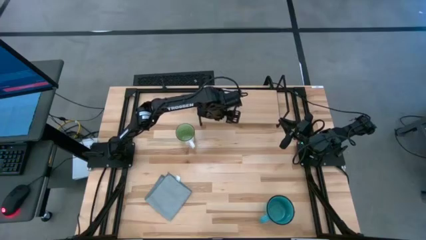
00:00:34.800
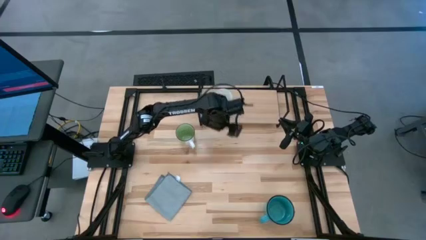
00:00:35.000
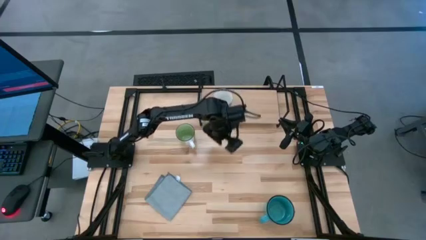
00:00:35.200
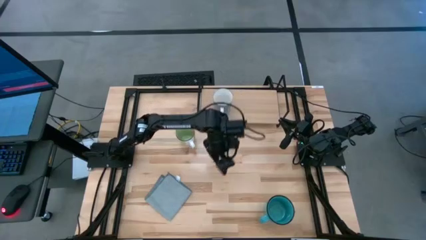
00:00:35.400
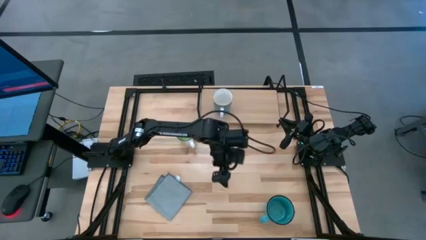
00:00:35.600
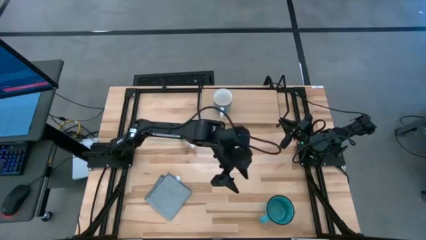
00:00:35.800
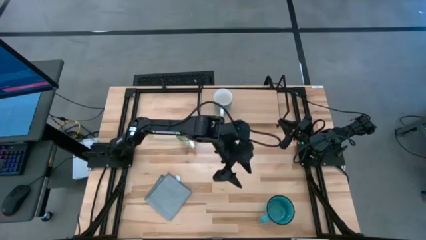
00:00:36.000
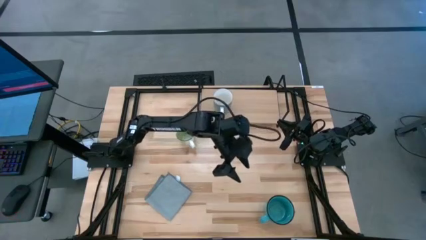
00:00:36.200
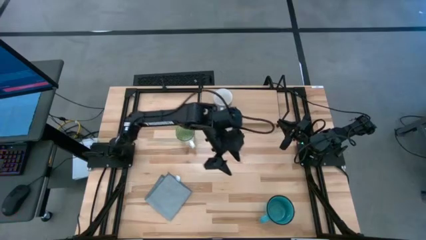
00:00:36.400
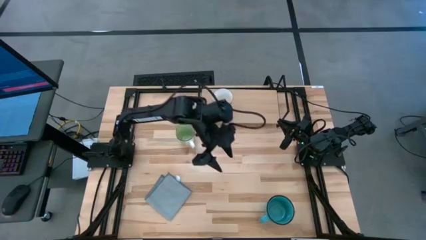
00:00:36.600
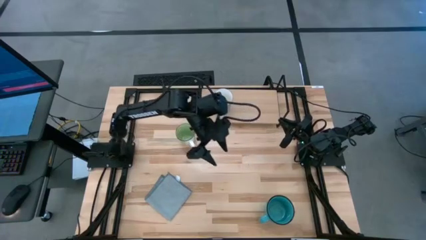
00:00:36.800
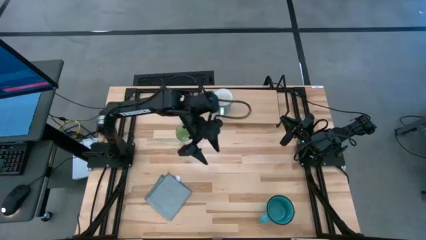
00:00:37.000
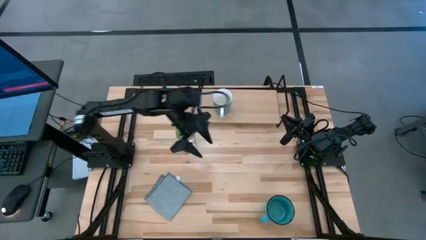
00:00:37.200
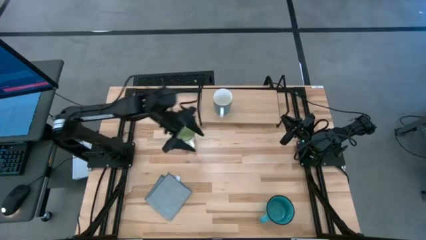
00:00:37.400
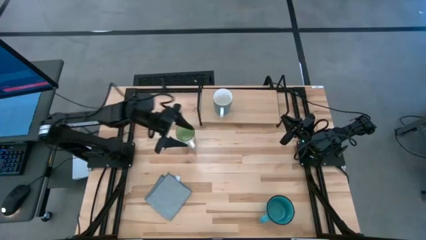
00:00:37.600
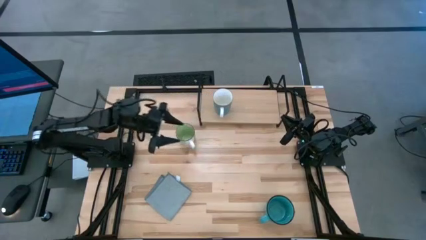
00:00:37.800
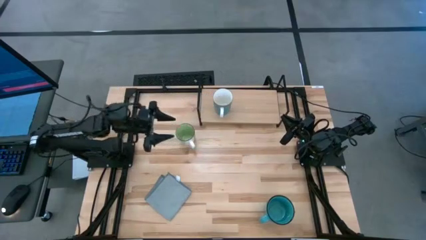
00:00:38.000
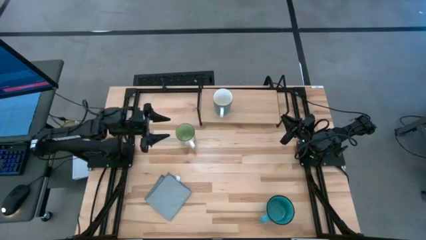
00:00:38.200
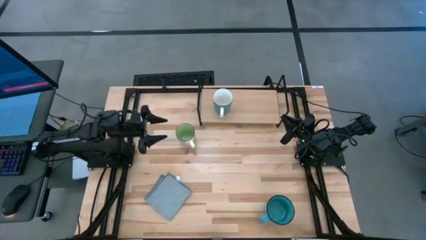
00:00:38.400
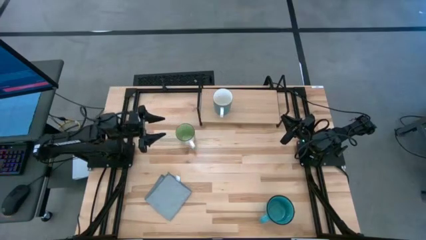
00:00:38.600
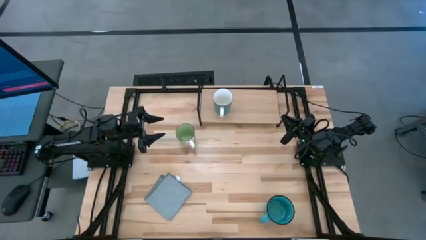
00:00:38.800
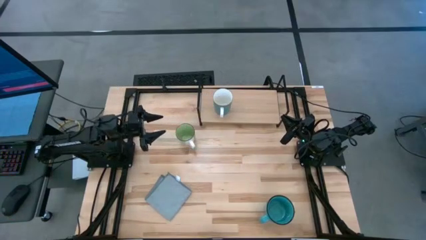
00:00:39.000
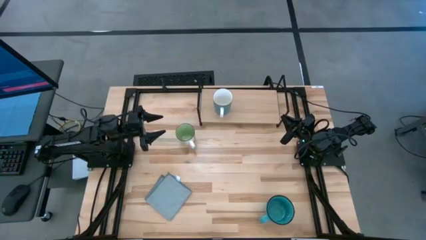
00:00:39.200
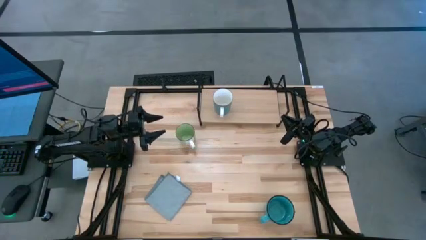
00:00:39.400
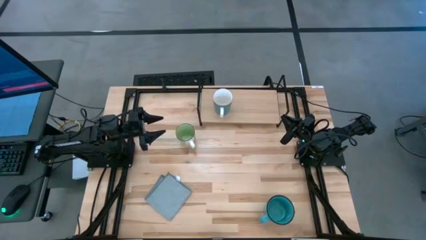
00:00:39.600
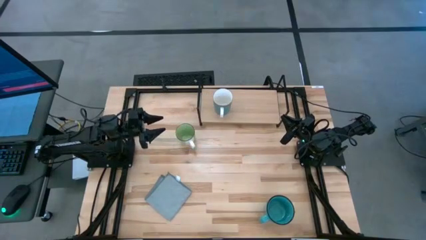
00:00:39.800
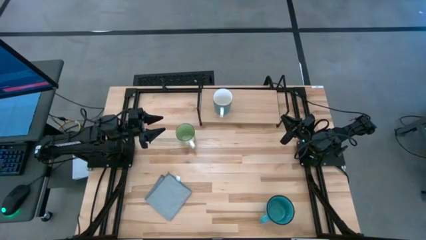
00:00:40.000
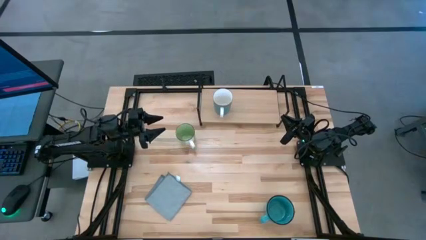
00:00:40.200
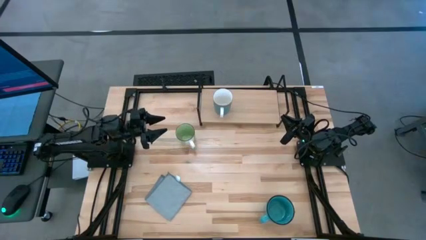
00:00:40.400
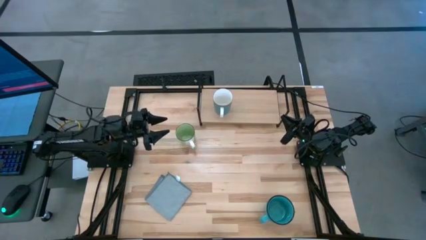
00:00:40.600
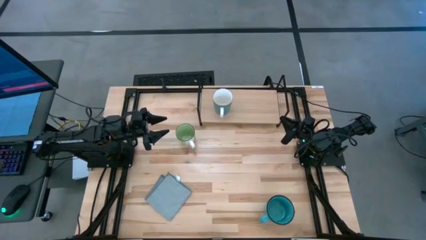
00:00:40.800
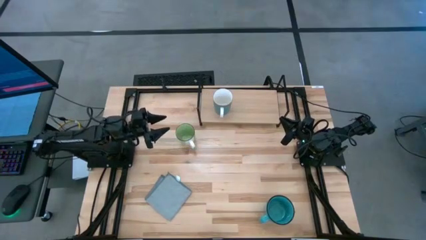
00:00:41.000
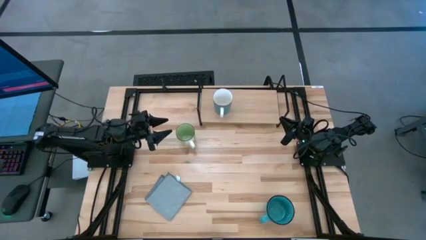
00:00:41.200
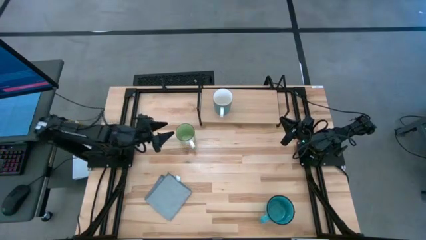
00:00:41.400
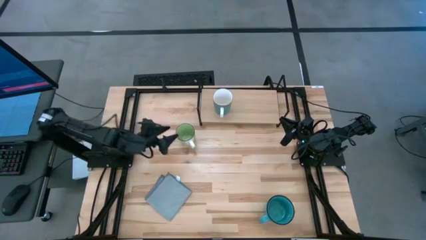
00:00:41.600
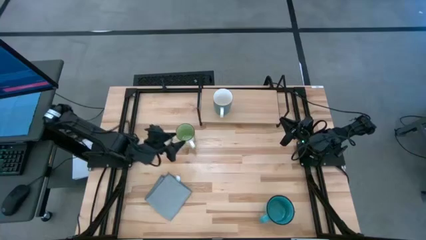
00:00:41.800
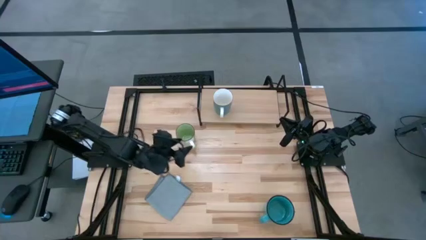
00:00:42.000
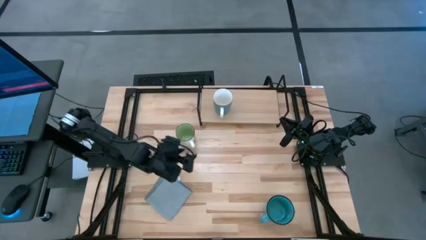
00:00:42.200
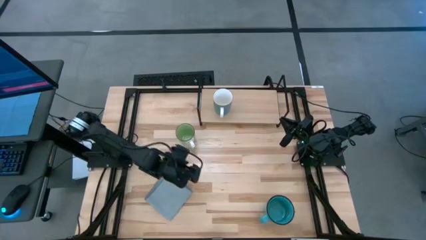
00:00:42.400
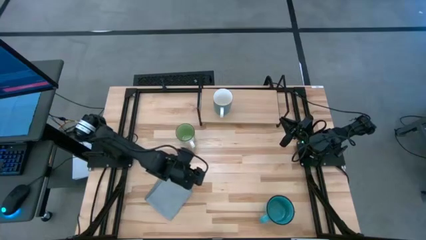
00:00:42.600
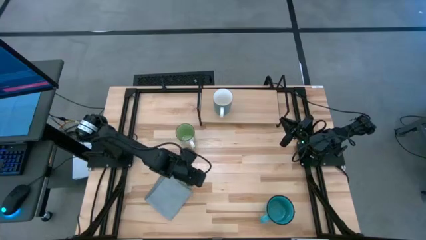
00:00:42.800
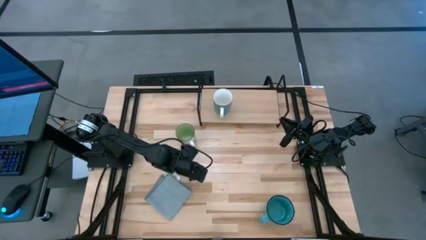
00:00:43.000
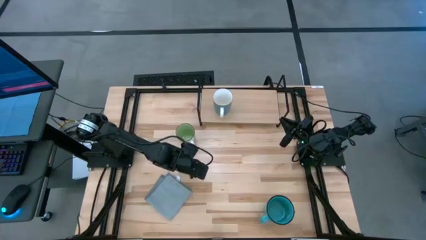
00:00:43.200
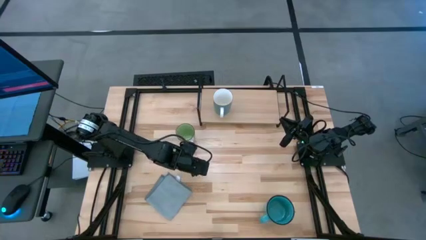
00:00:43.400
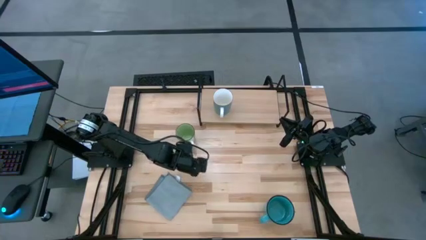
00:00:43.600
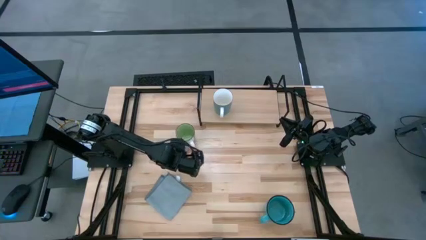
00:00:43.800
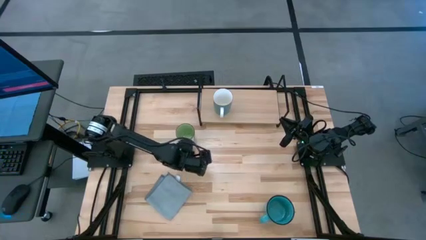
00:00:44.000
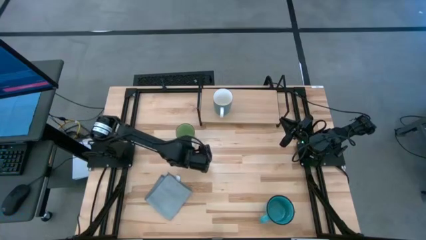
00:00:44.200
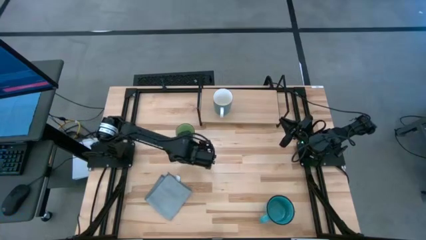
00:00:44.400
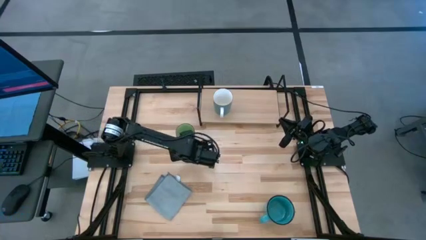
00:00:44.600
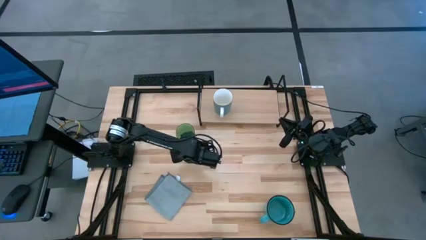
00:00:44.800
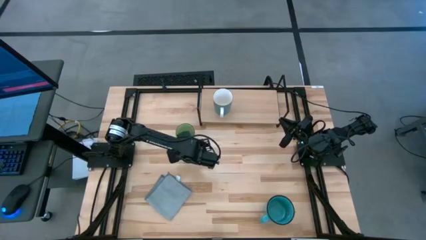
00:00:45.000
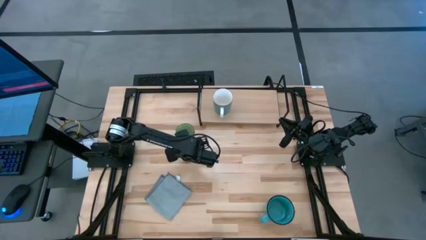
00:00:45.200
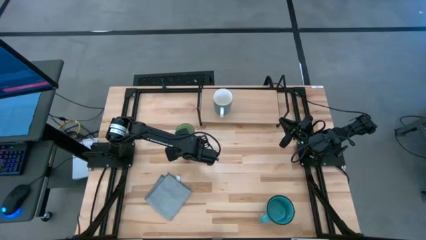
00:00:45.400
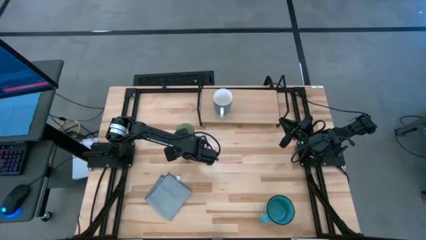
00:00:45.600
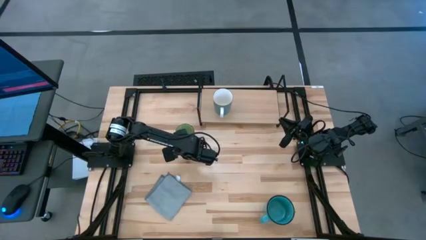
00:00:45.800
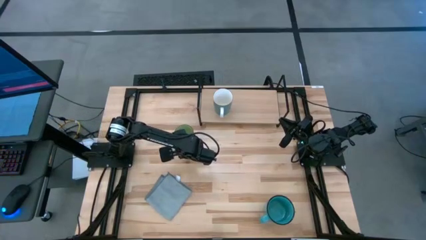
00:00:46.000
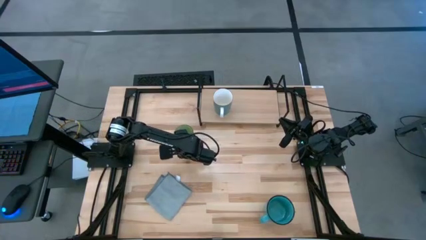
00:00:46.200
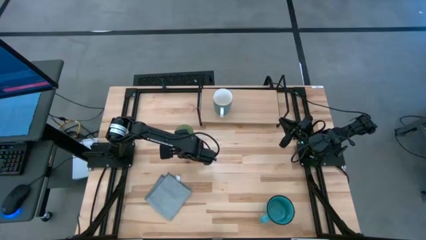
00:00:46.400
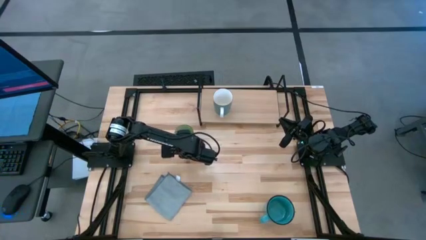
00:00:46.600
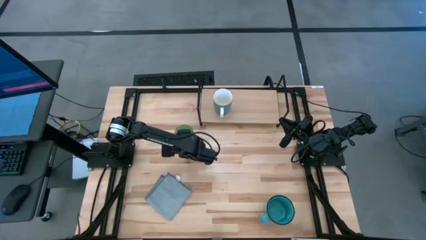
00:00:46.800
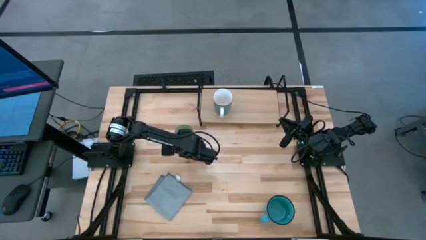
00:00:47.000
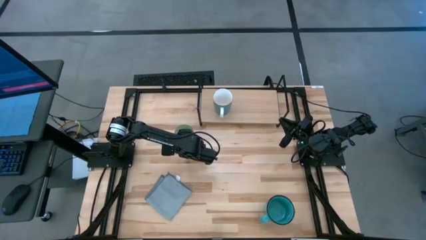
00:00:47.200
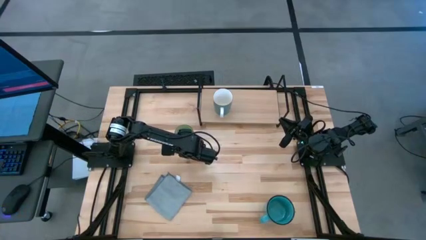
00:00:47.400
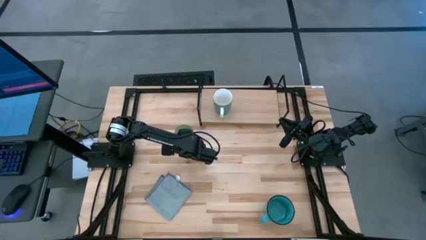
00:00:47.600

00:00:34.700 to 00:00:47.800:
Task: Stack small to large cups/mugs on shelf
Put the green mug on the shelf
